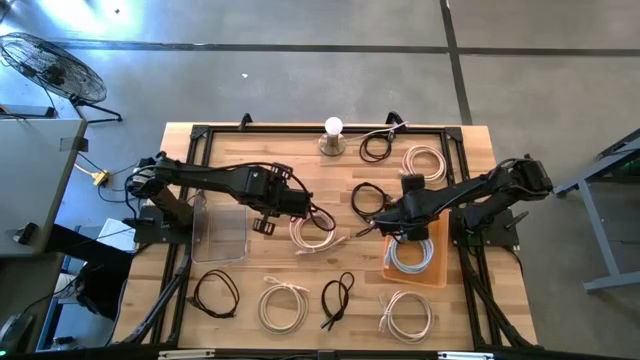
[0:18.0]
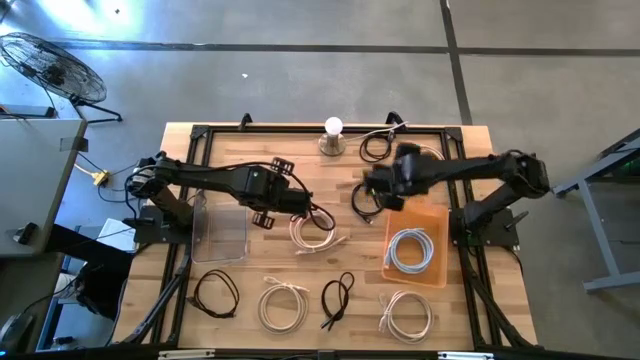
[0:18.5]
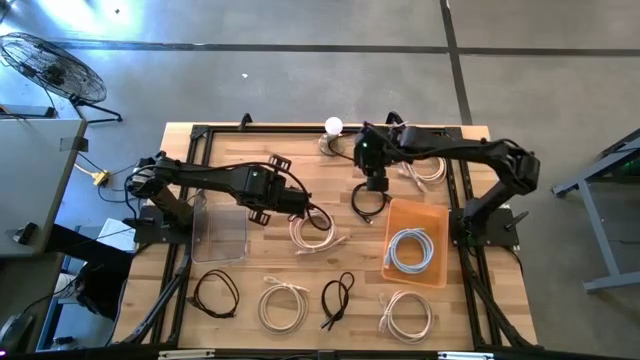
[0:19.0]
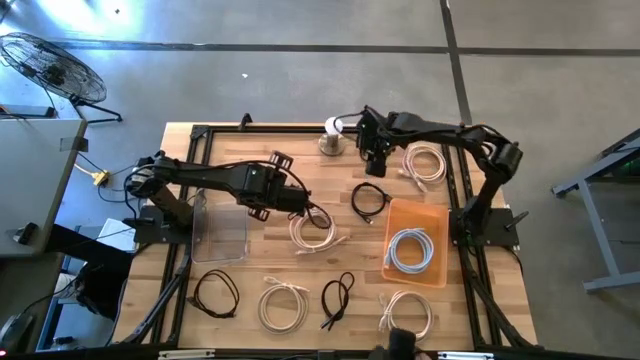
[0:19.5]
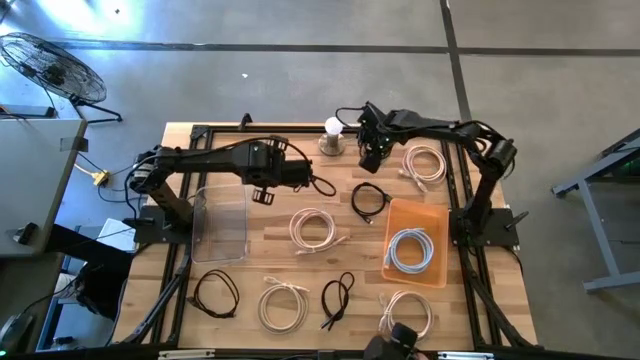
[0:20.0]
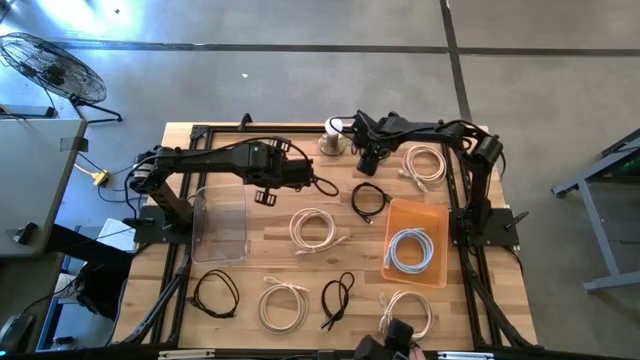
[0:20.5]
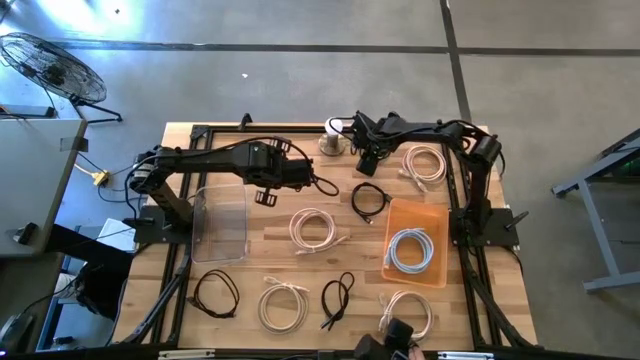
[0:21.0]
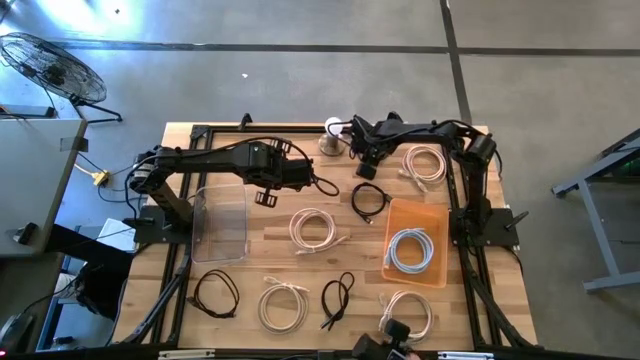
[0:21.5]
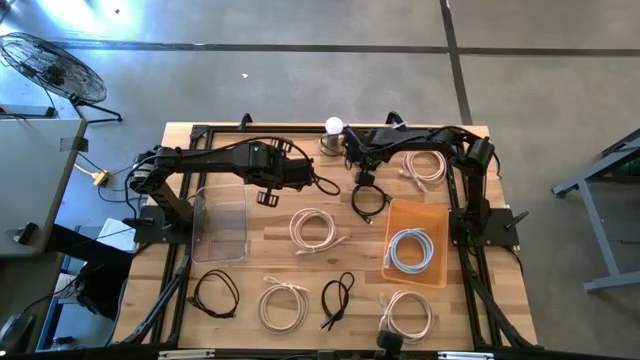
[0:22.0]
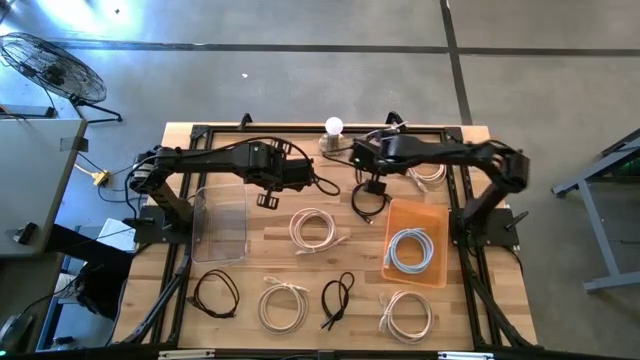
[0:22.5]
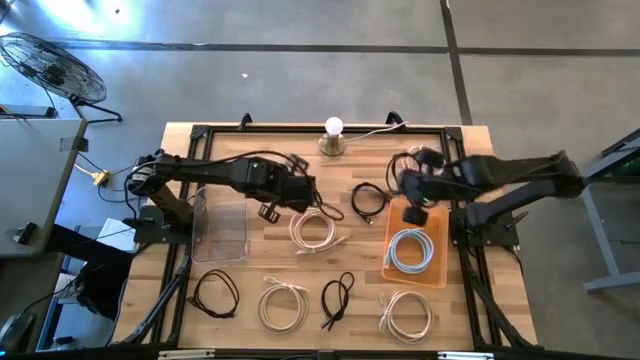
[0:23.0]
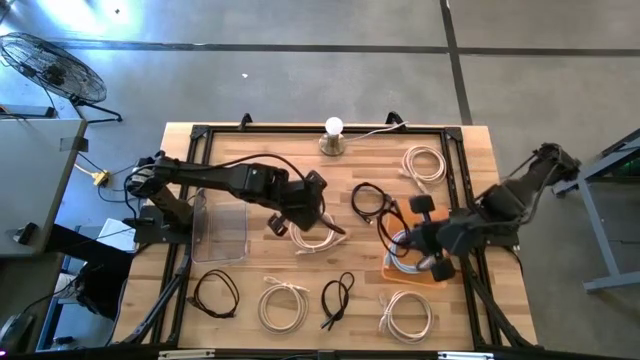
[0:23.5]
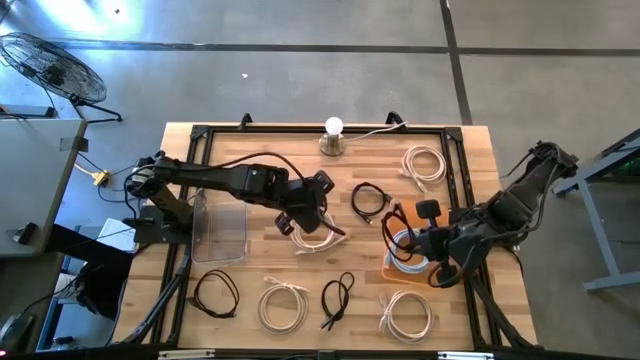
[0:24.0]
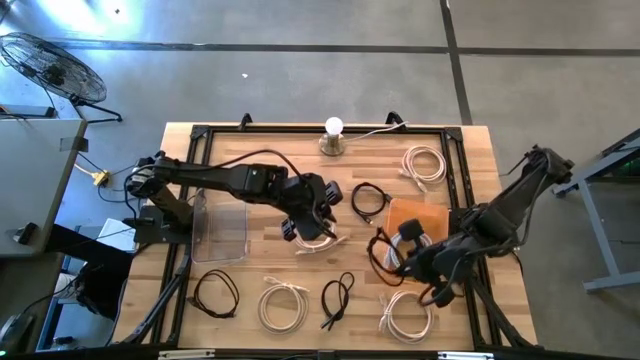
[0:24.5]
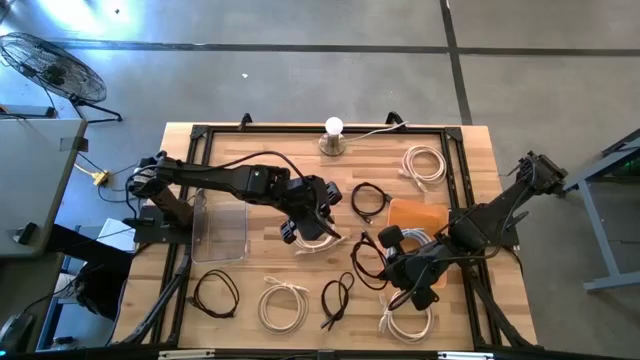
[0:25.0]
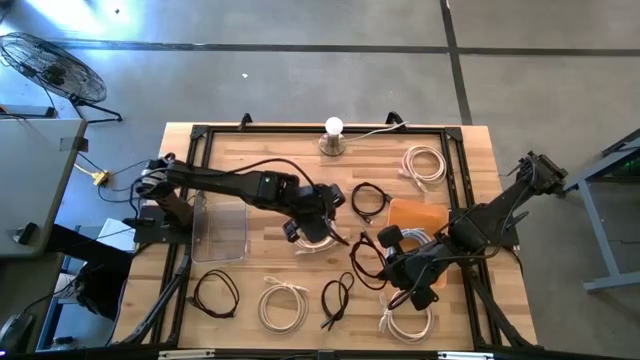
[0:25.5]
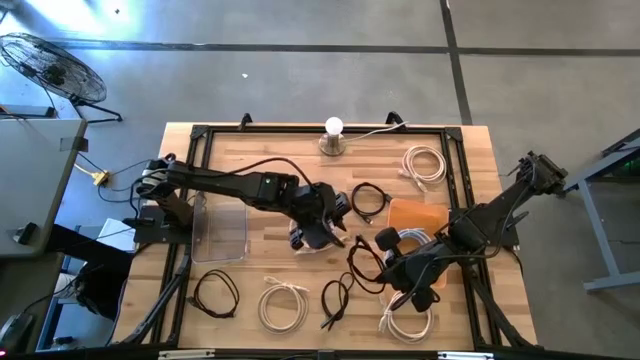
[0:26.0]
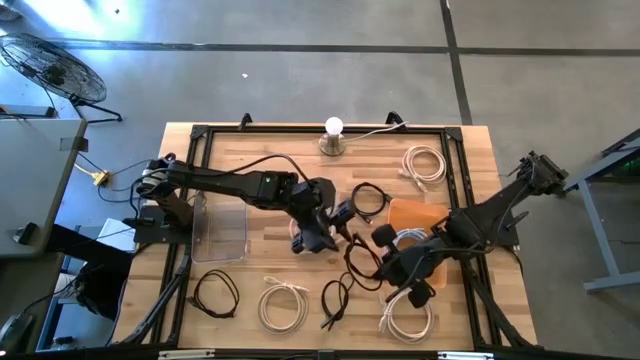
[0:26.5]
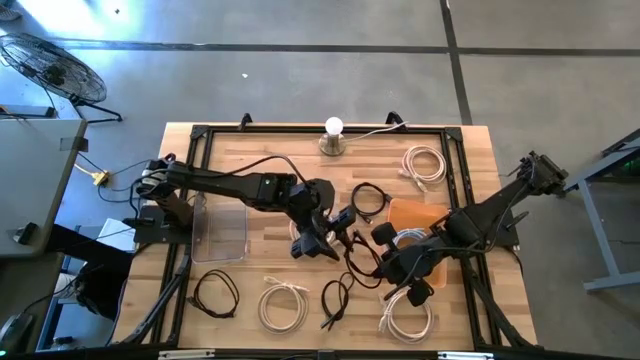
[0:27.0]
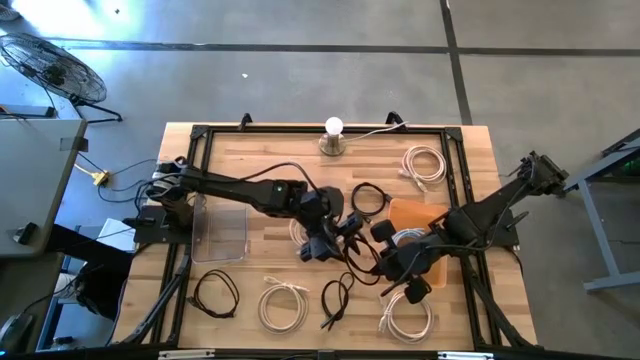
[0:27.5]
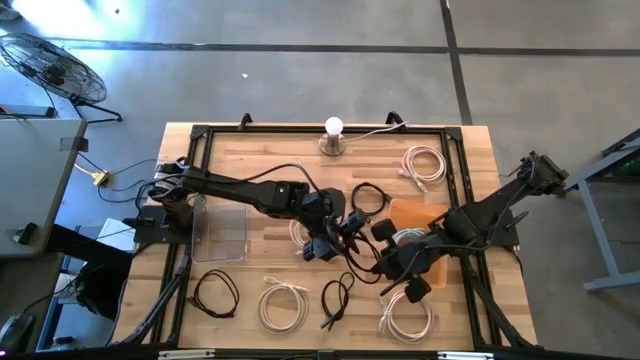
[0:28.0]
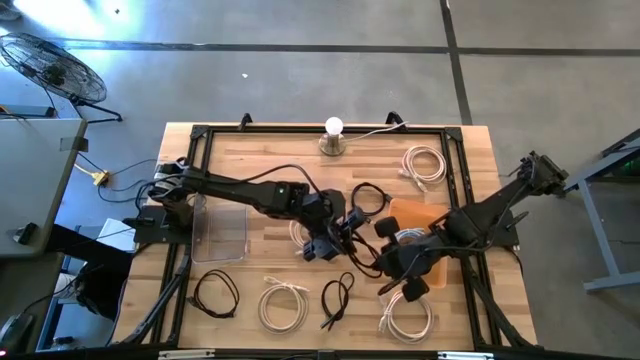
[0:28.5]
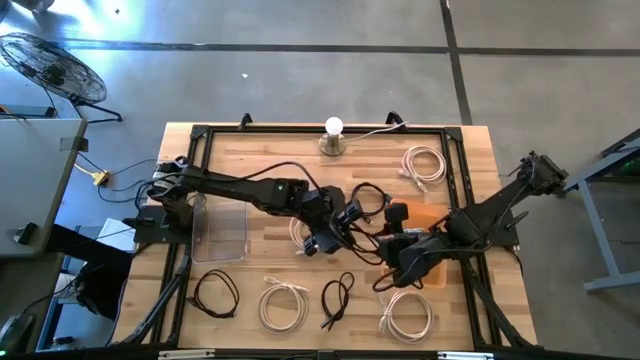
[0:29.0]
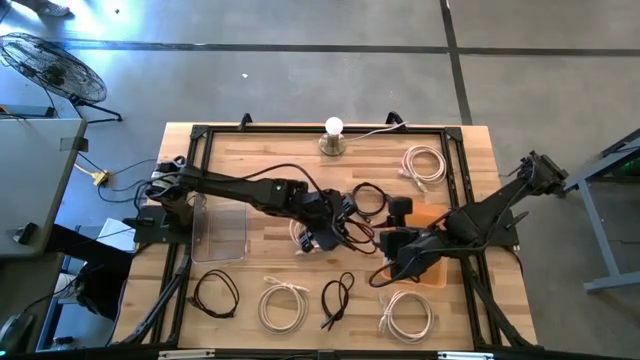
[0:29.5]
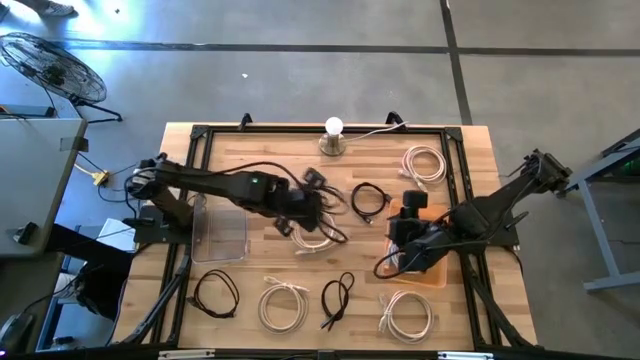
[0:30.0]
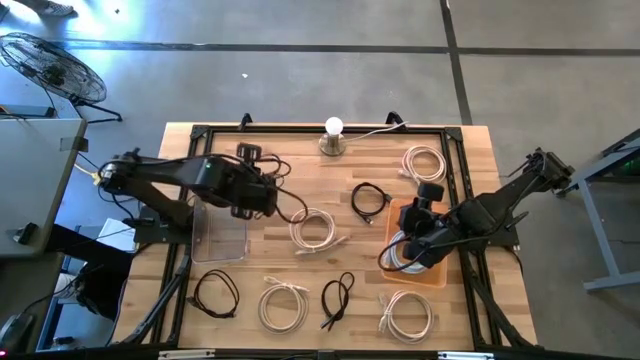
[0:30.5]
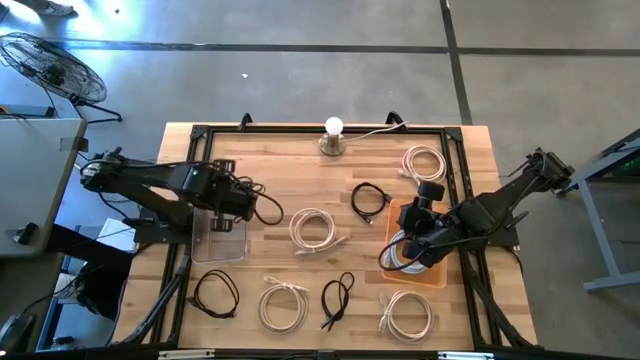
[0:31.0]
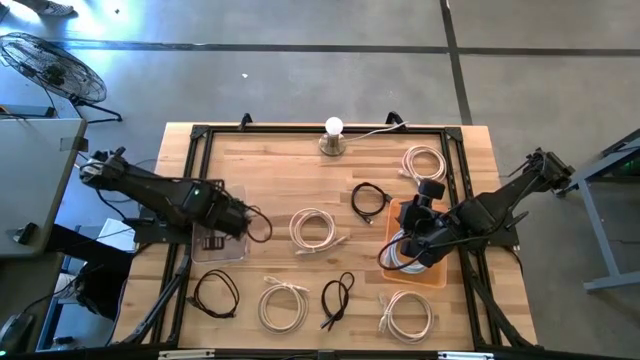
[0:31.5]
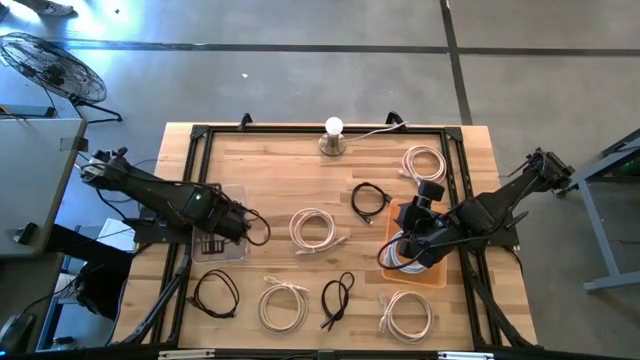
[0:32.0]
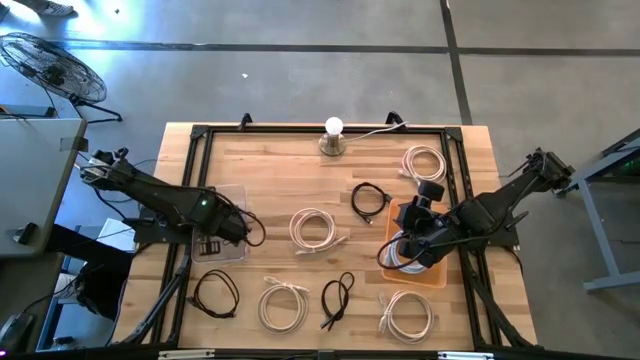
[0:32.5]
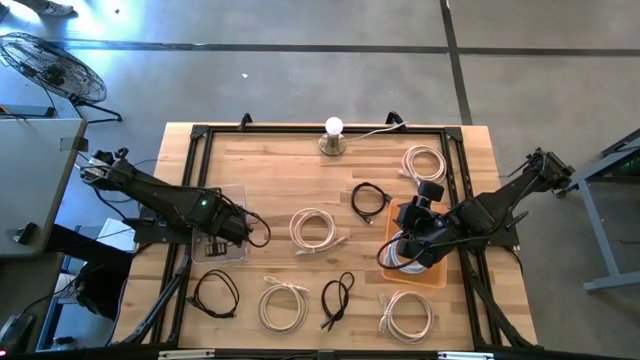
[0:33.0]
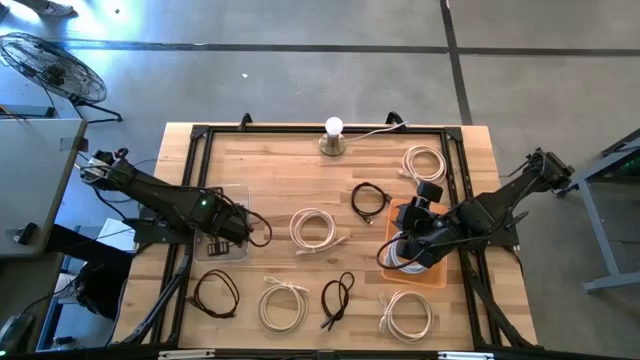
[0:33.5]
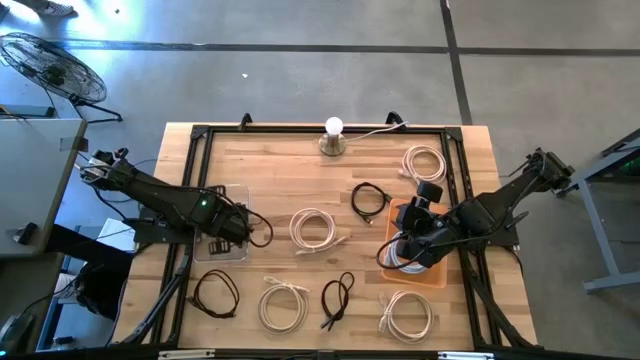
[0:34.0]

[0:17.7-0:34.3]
Task: Pick & Place USB Port
Put the black USB cable into the transparent bin

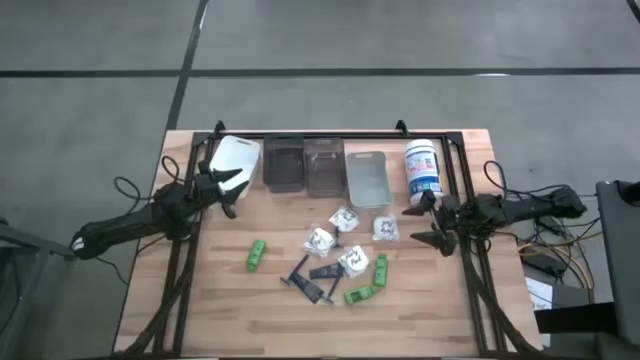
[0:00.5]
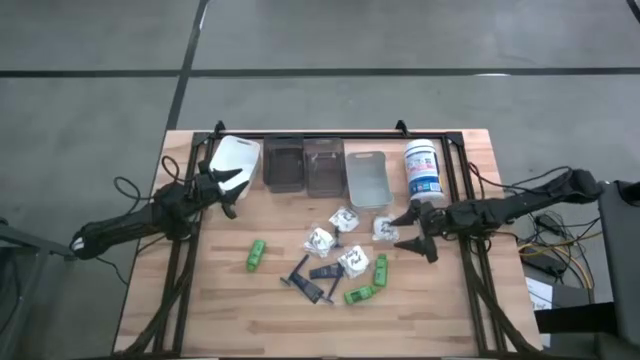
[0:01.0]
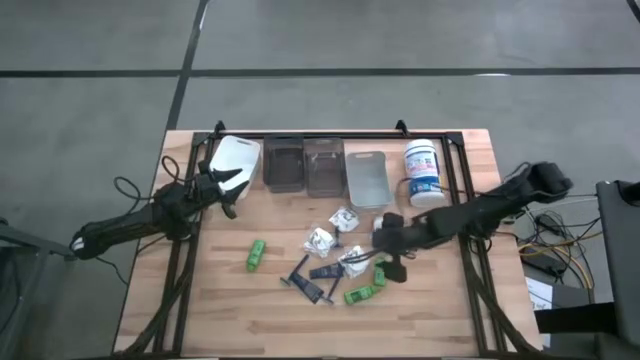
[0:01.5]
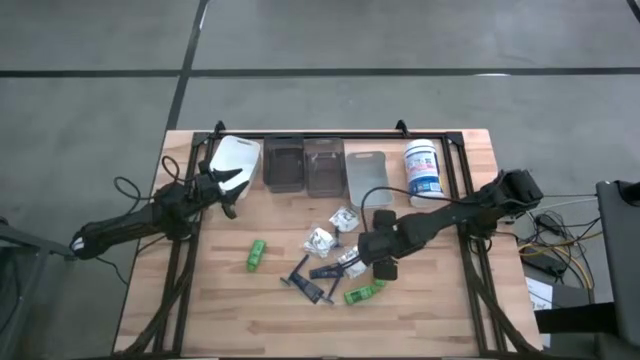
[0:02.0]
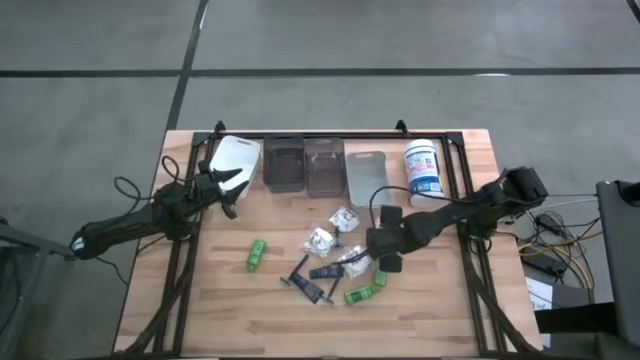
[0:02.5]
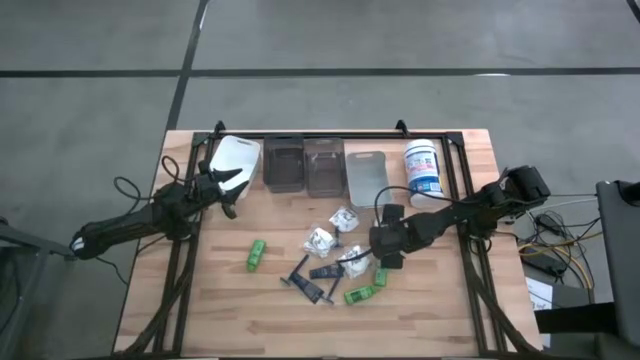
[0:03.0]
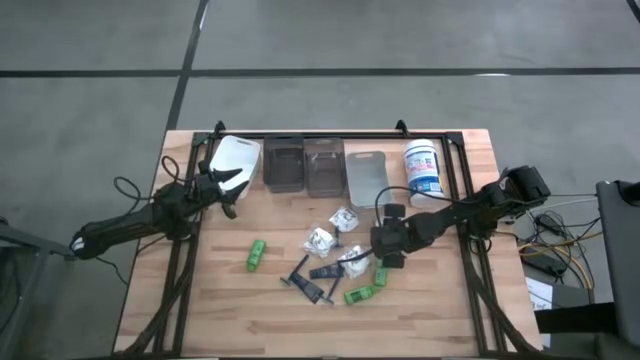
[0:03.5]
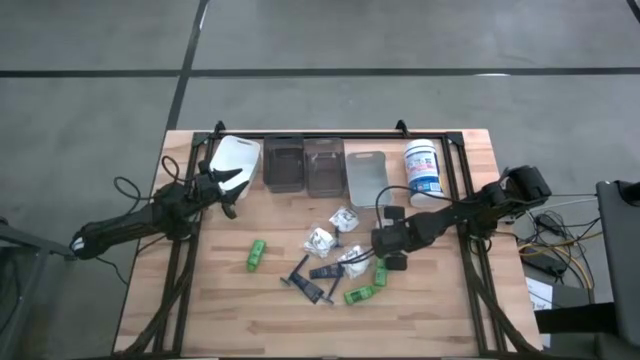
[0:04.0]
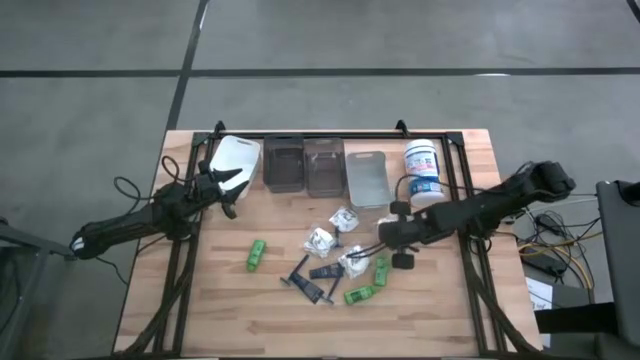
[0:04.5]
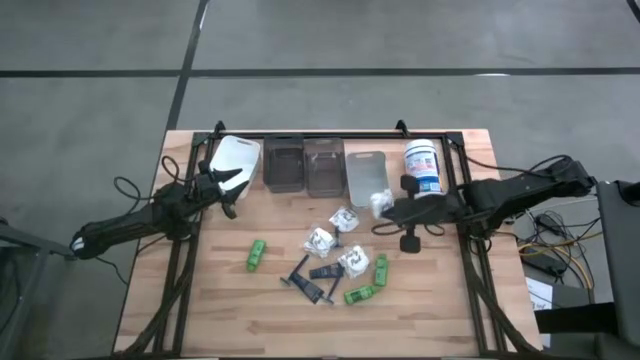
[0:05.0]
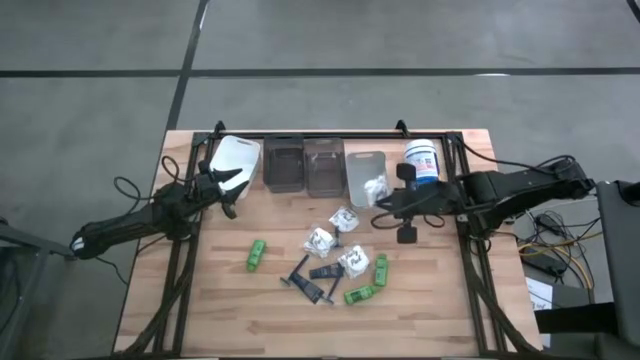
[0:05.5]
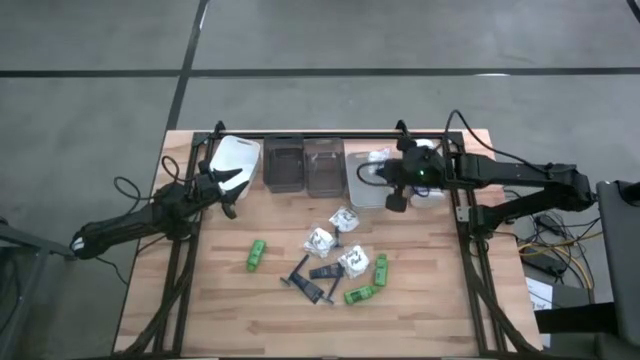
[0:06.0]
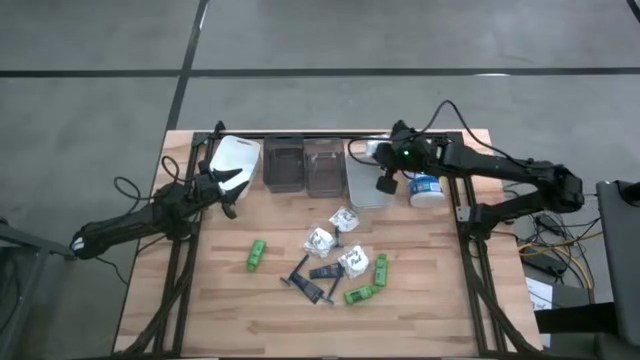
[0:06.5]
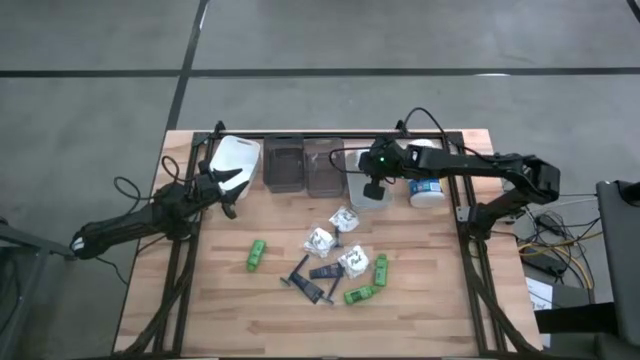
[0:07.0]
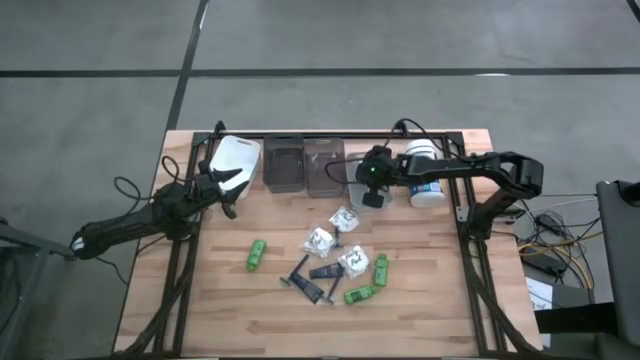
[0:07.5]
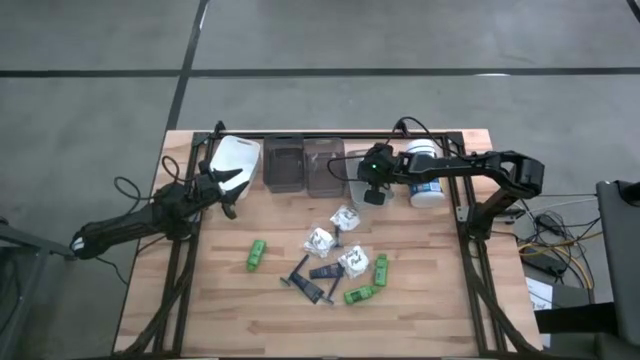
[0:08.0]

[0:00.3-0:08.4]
Task: Pick & Place Travel size toiletries
Put the cotton pack into the grey bin
